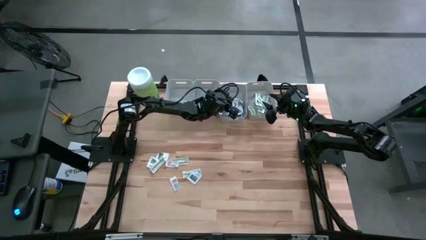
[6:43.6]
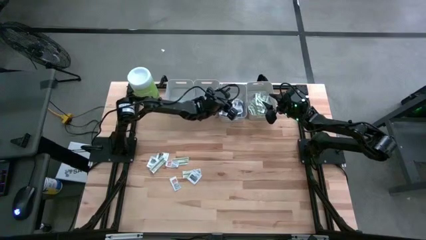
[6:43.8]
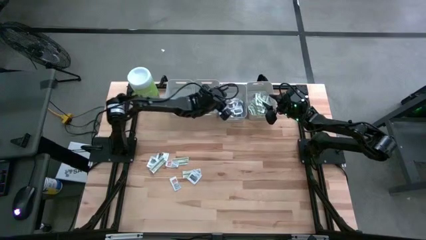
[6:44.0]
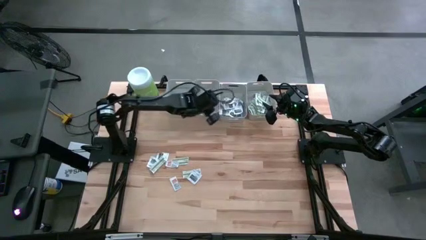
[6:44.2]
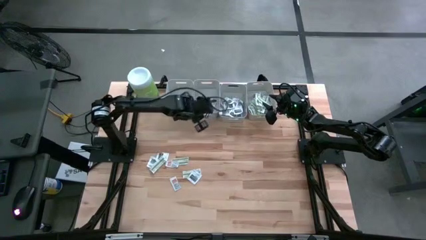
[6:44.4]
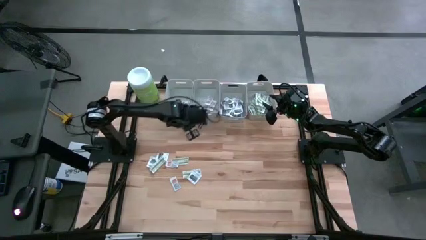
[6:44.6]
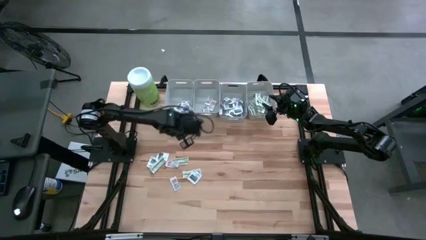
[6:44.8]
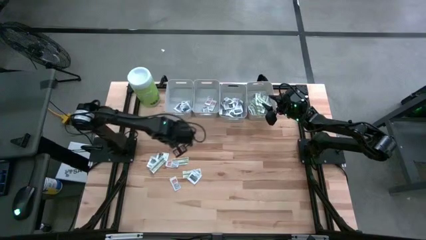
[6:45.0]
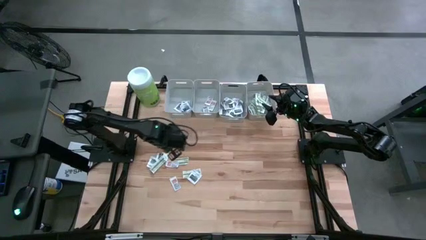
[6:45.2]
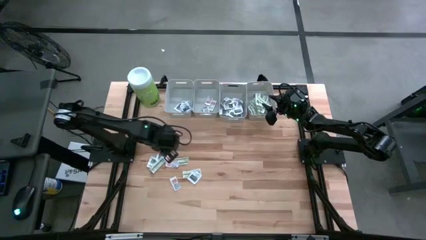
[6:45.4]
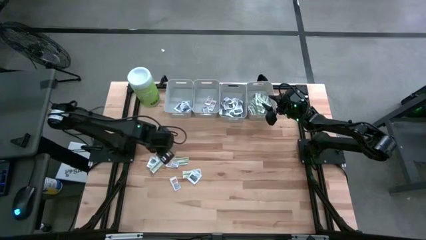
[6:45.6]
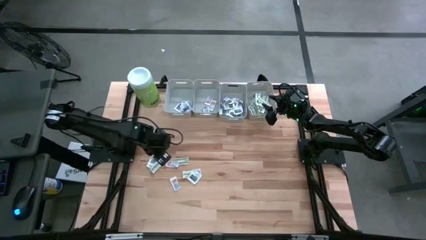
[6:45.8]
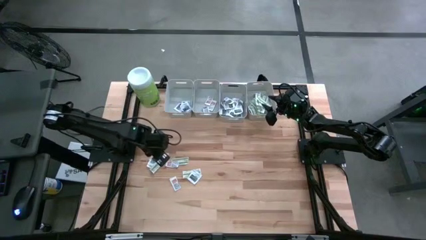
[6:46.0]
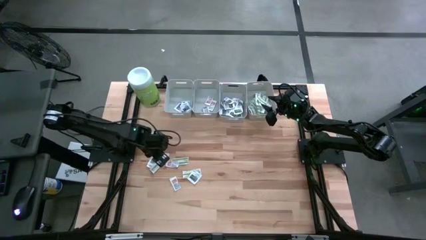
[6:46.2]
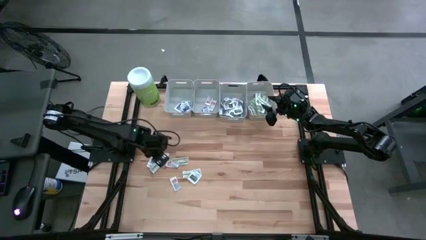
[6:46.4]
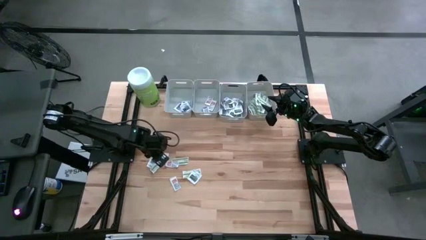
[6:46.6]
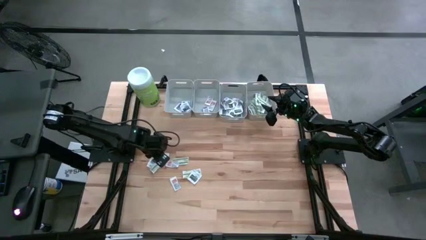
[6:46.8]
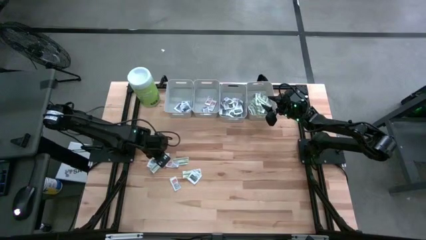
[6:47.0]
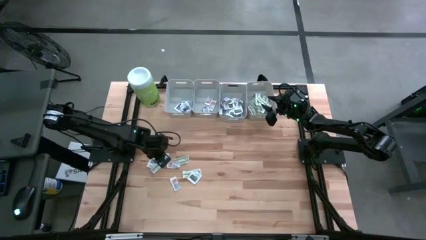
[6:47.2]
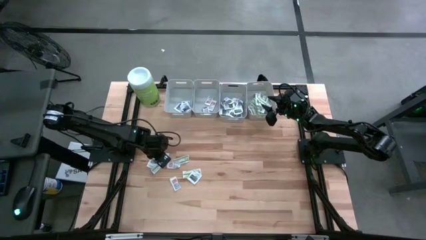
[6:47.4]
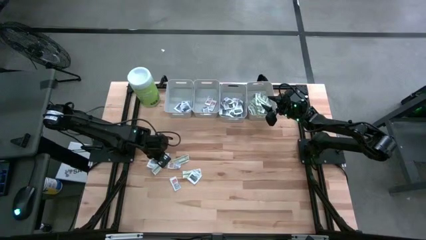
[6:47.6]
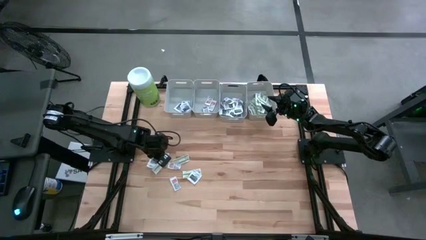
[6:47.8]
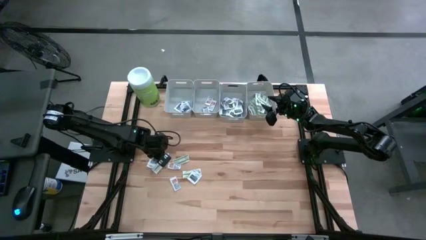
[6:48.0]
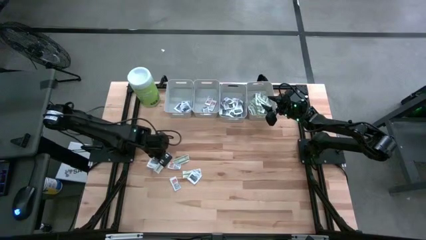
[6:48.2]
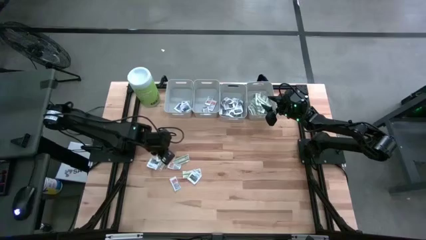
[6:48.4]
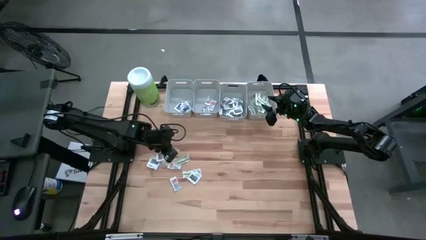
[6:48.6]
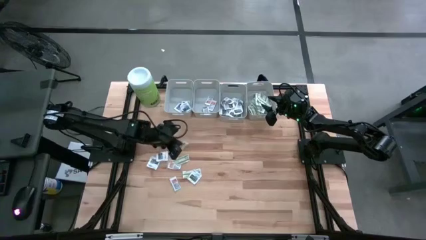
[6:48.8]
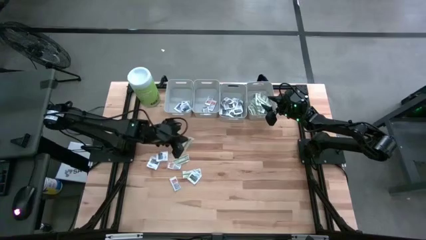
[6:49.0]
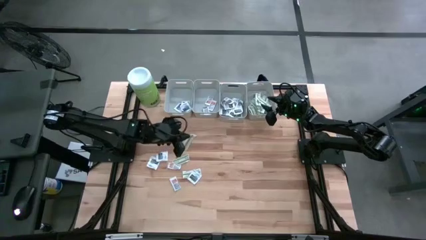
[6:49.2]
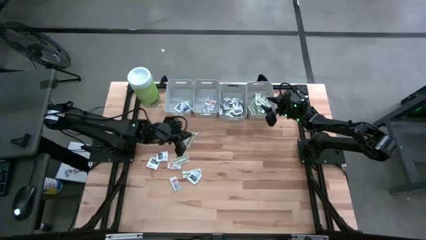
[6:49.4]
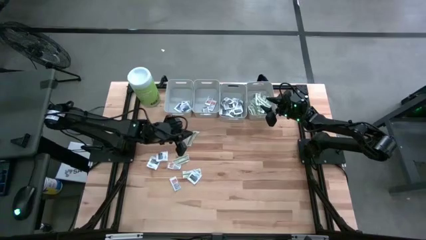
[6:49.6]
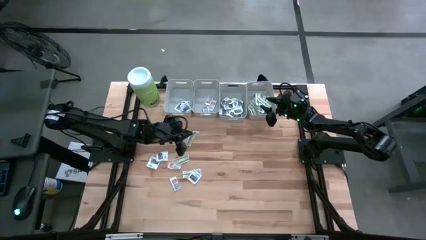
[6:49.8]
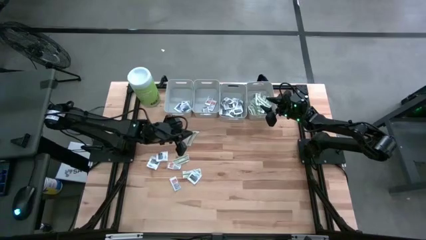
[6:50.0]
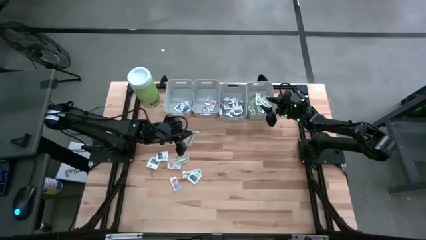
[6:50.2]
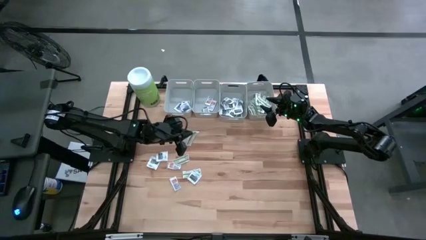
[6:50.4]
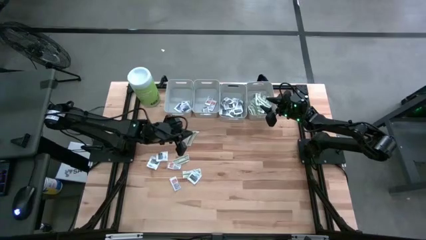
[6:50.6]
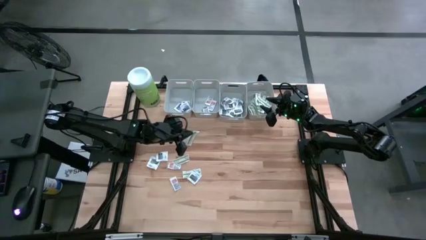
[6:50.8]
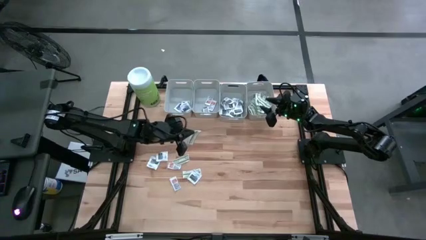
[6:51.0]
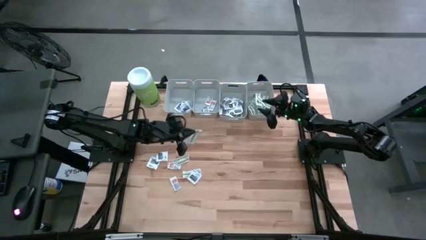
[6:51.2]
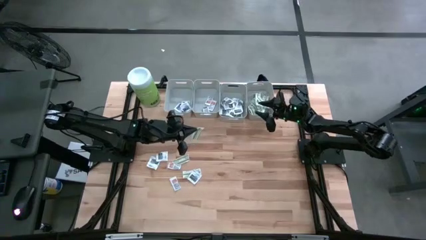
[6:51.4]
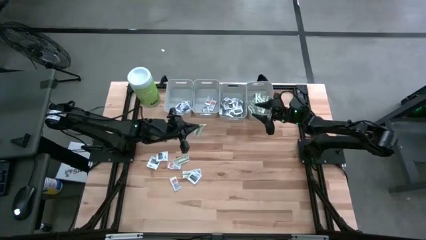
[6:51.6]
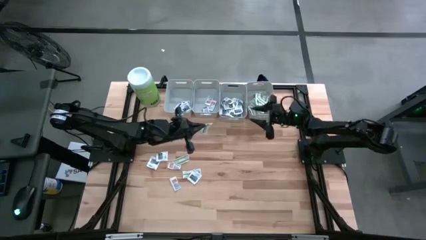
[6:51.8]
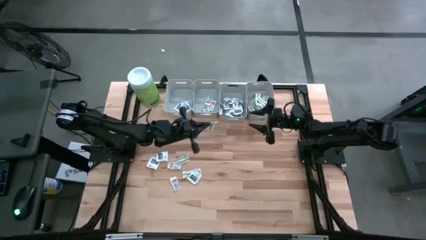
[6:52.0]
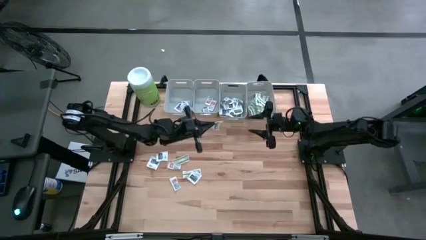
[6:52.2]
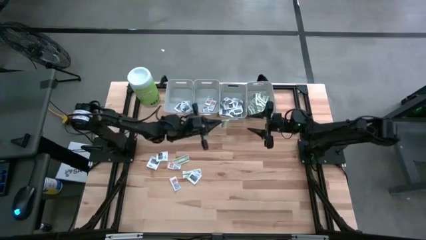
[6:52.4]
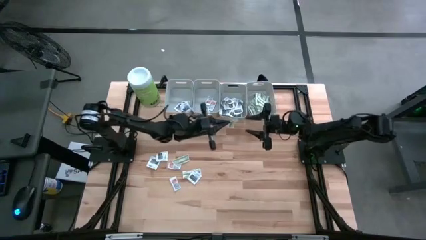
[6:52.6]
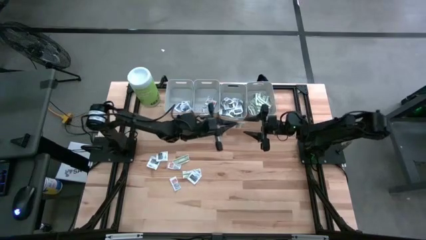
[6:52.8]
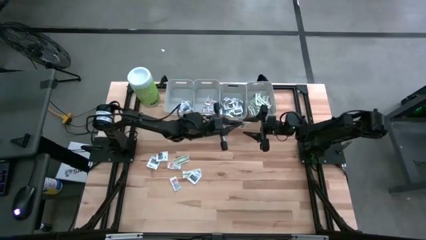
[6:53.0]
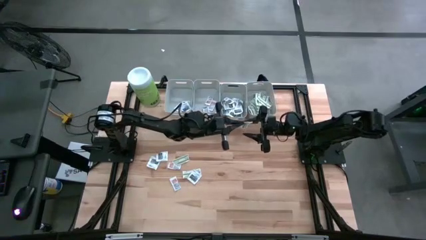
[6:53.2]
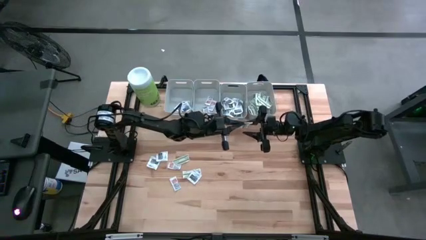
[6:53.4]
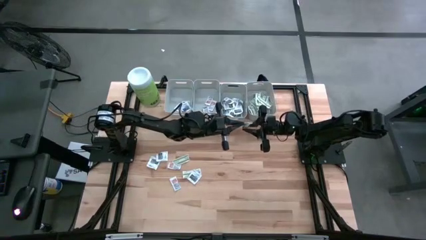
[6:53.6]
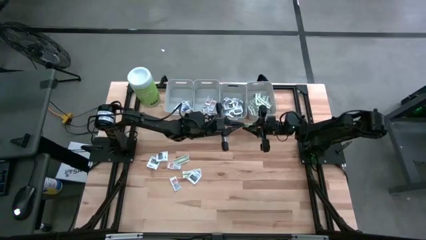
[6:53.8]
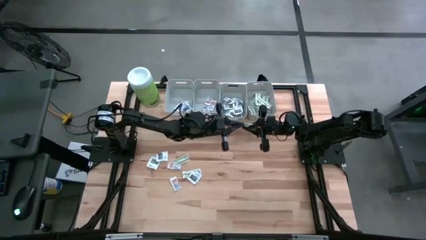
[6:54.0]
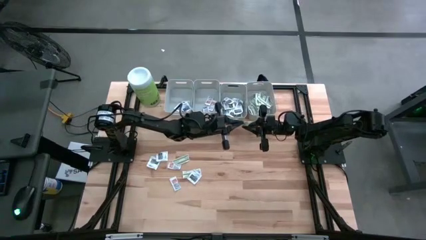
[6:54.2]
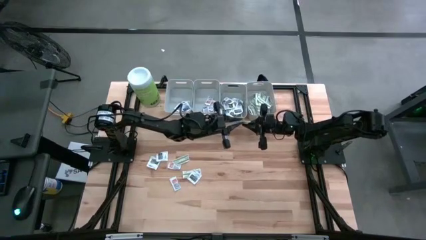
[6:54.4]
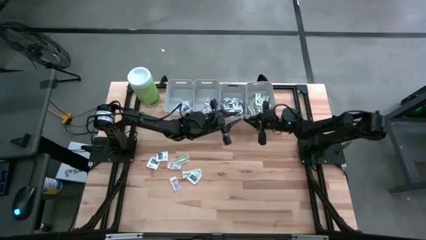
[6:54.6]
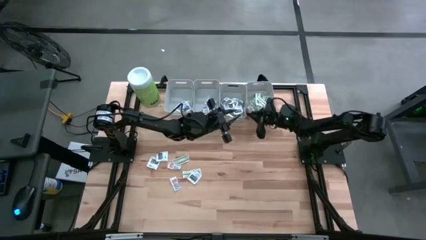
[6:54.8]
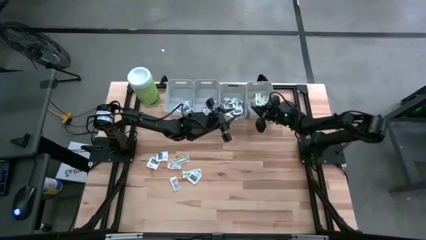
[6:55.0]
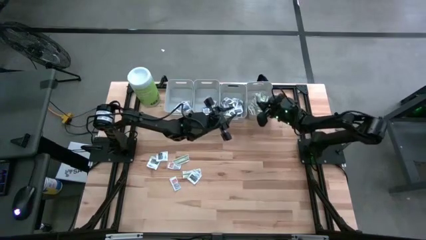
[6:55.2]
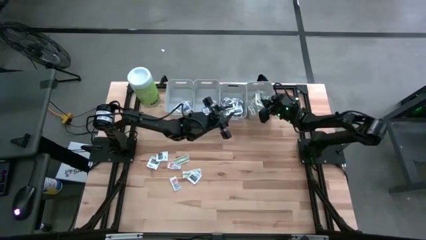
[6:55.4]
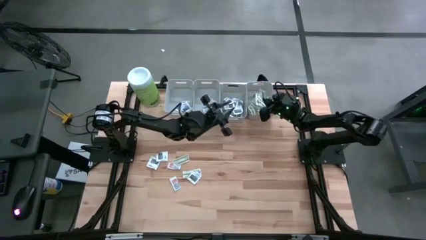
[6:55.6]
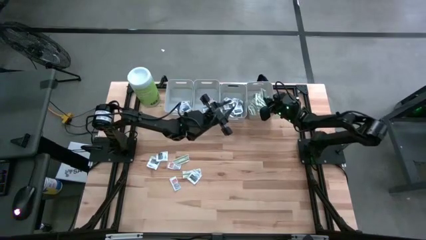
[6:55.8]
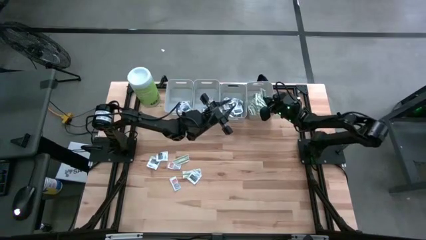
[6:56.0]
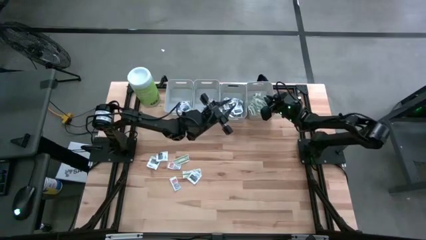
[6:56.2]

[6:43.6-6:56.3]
Task: Pick & Place First Aid Supplies
Put the bandage into the right gray bin

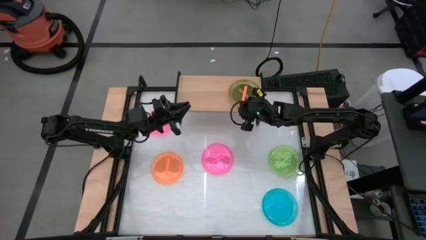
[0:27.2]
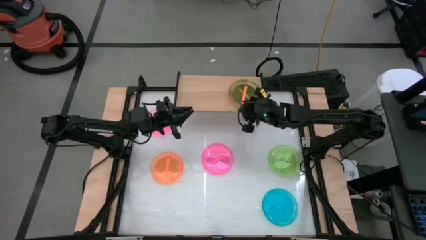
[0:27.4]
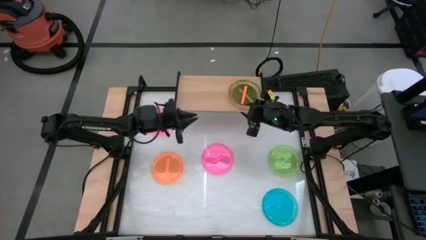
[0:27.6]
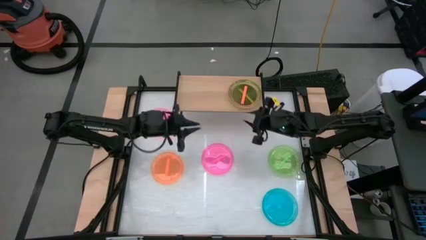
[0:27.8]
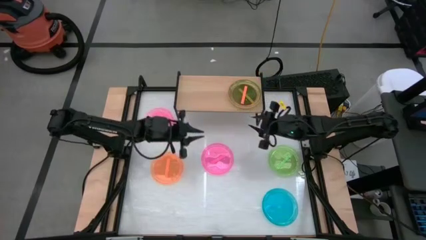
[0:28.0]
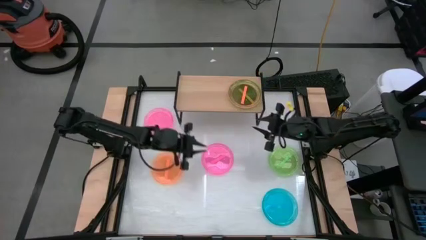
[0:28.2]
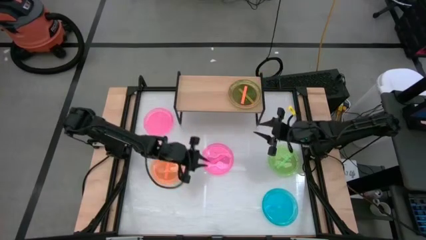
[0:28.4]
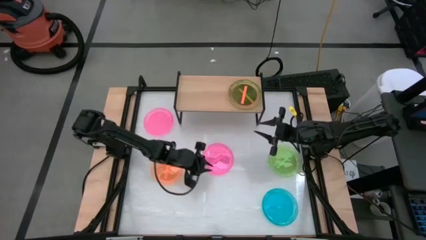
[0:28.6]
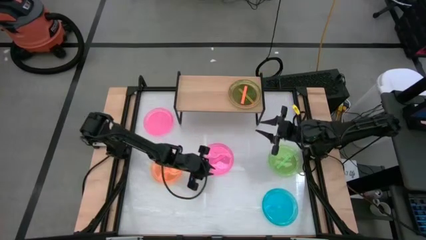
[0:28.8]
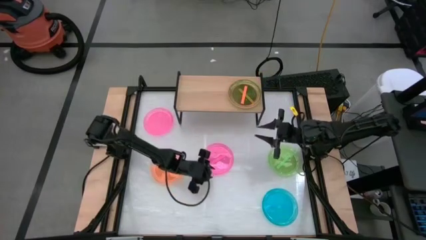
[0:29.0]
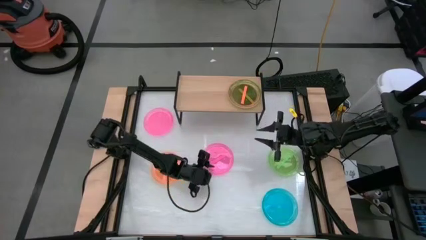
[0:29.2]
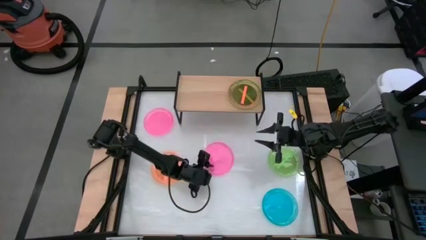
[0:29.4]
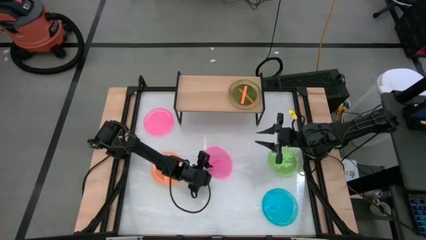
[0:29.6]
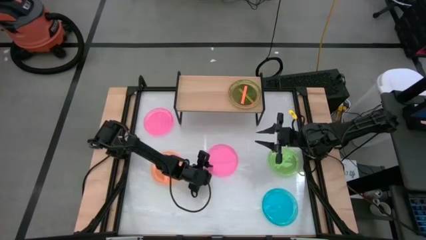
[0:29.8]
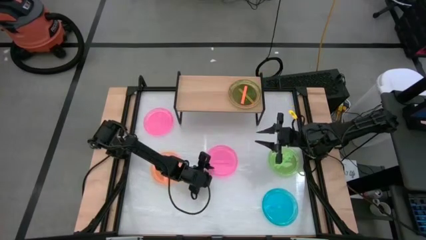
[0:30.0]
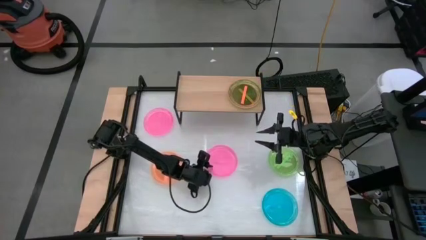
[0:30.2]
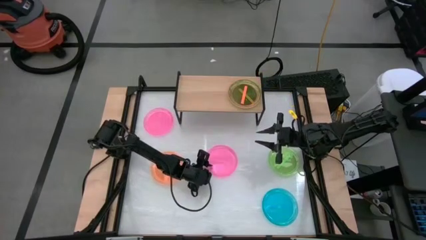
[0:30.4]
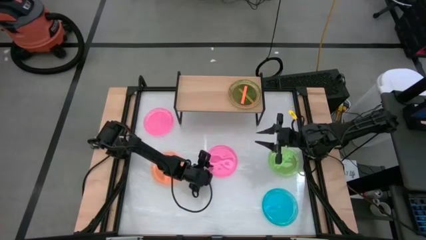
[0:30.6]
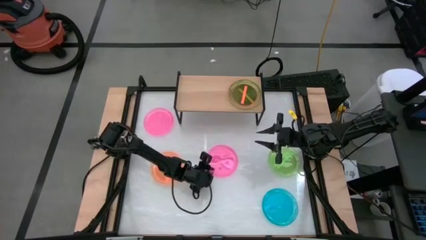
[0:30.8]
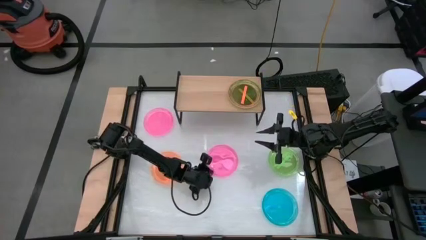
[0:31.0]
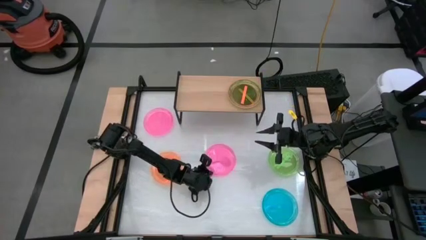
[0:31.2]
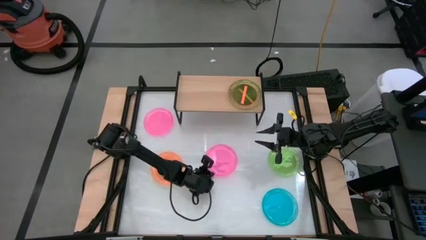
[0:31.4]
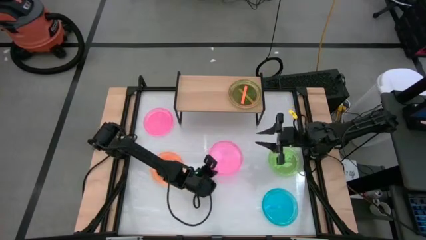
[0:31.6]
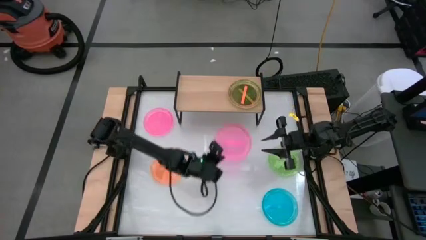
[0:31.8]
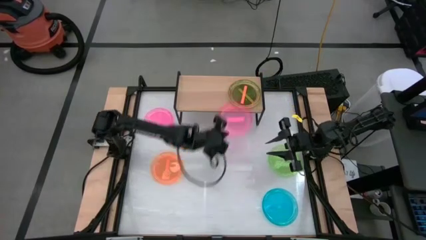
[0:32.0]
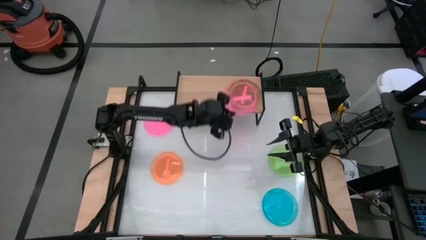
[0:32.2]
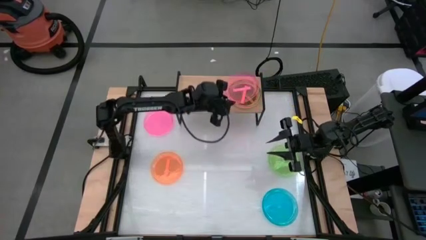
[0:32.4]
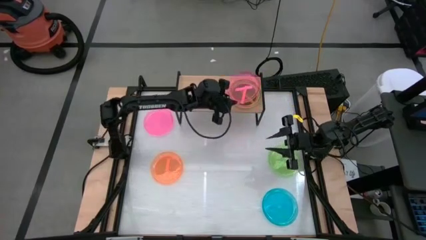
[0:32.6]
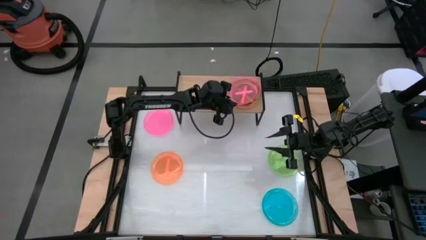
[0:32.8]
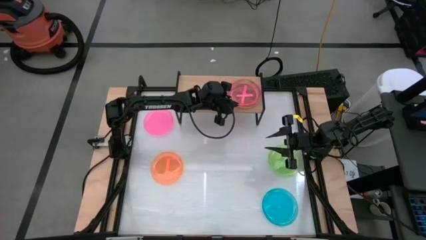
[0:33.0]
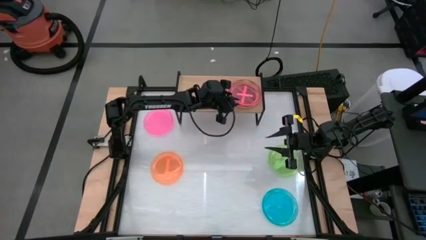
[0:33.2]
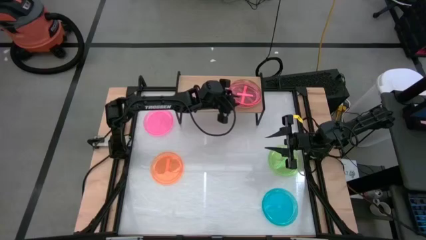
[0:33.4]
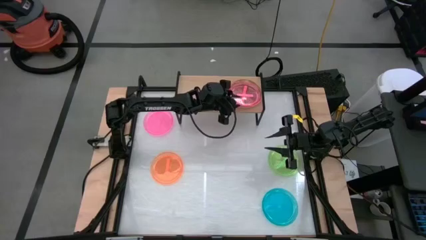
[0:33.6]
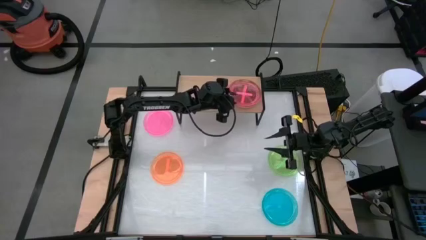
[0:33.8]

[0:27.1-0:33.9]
Task: Place and stack plates onto a shelf
Stack the bottom pink plate on top of the orange plate on the shelf
